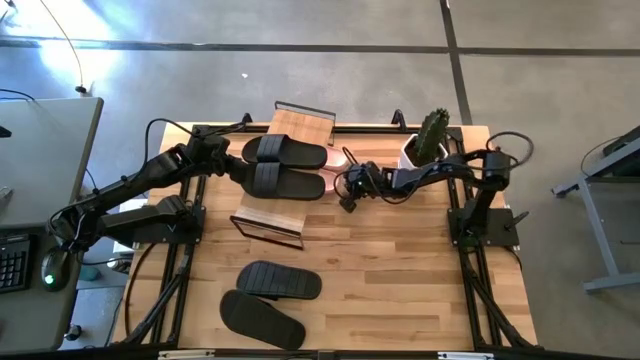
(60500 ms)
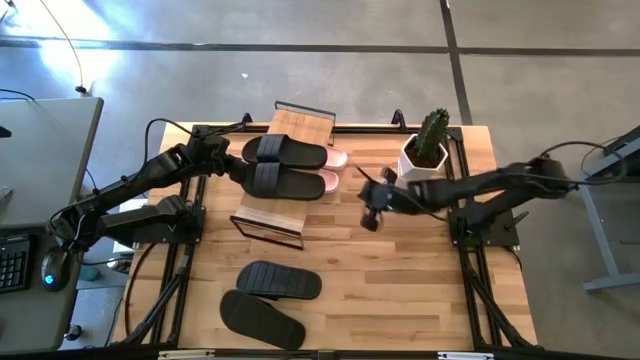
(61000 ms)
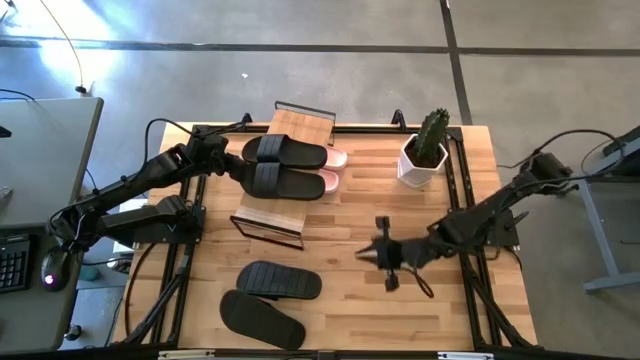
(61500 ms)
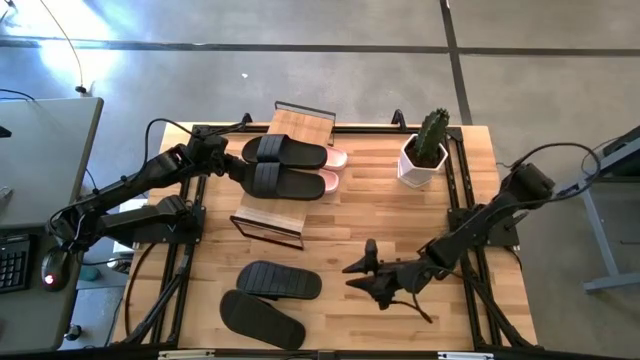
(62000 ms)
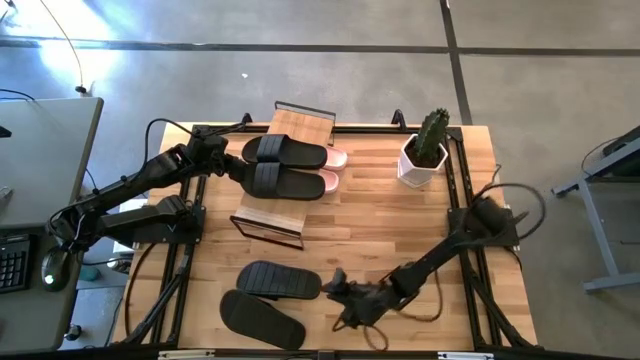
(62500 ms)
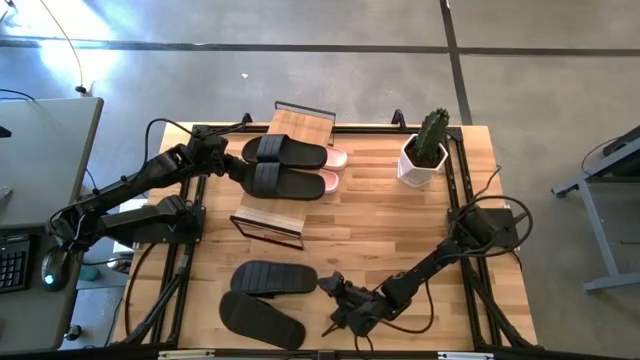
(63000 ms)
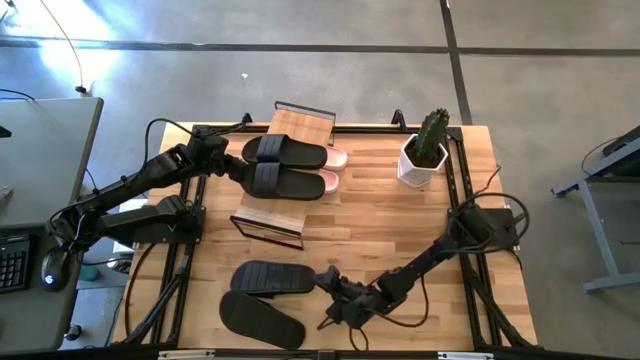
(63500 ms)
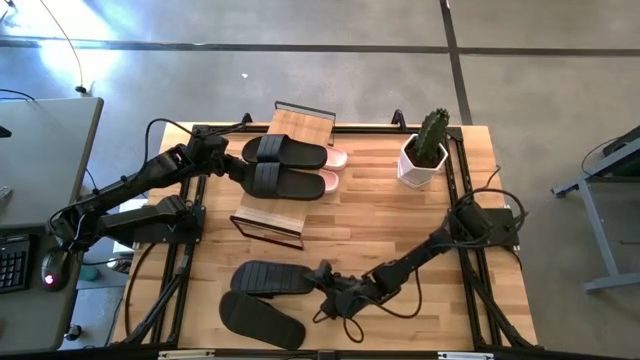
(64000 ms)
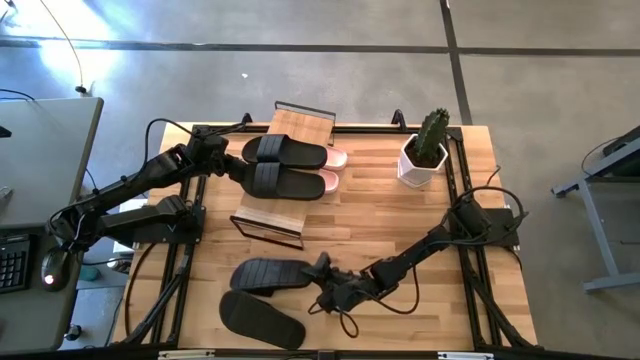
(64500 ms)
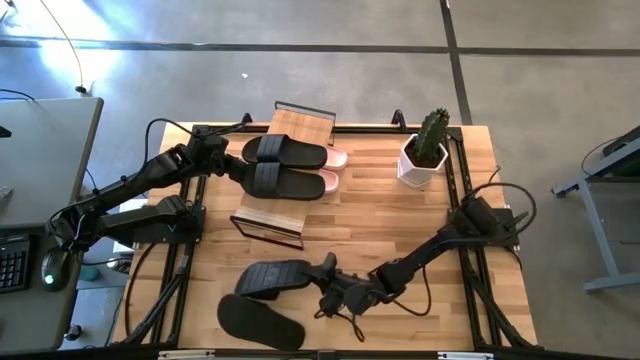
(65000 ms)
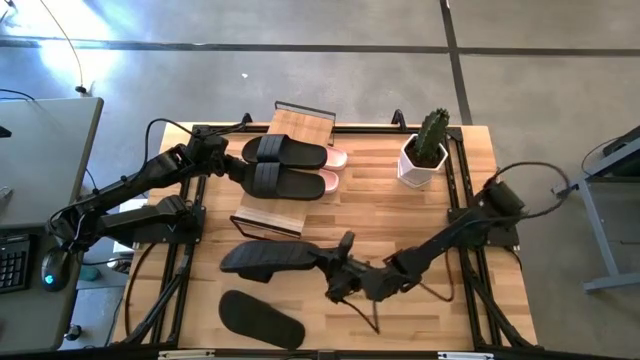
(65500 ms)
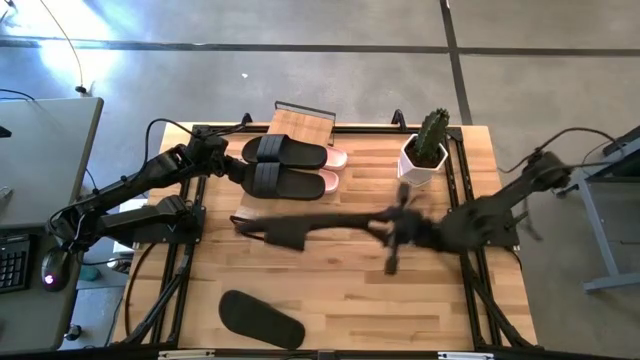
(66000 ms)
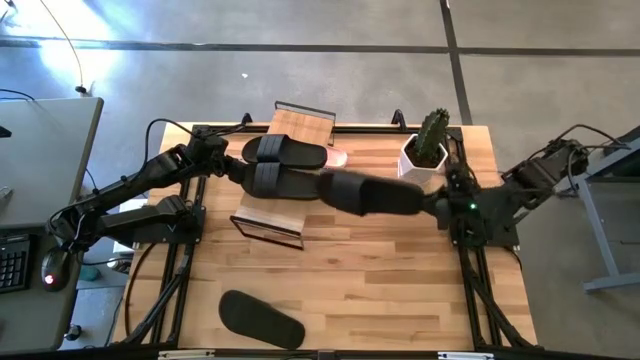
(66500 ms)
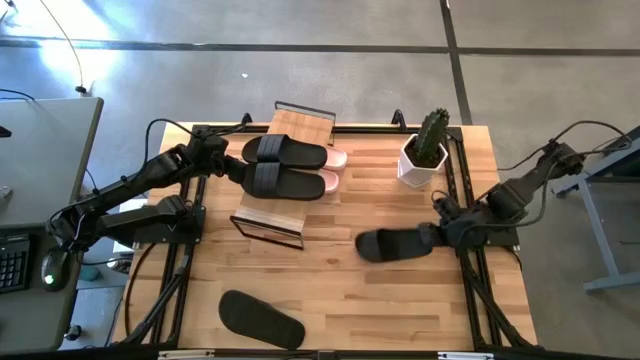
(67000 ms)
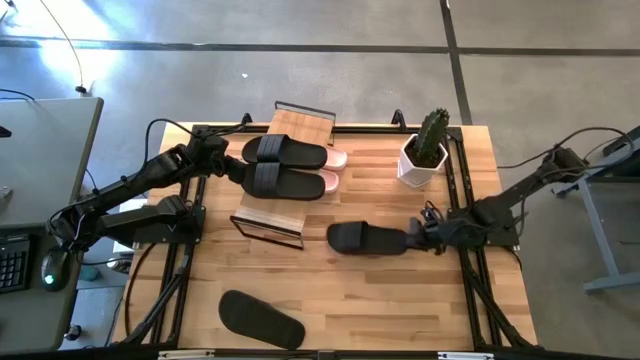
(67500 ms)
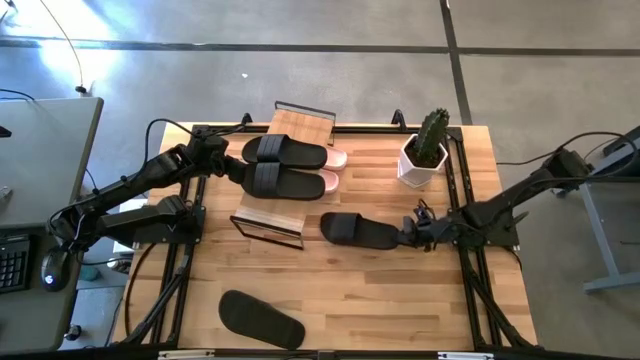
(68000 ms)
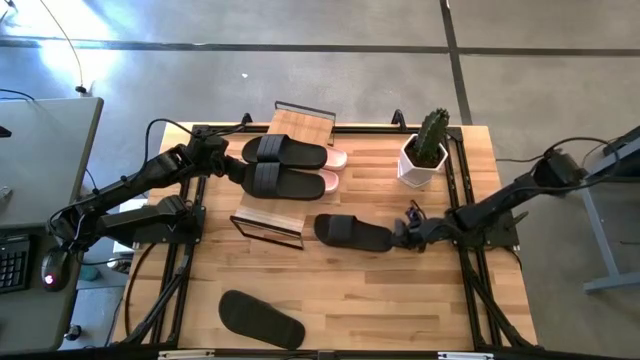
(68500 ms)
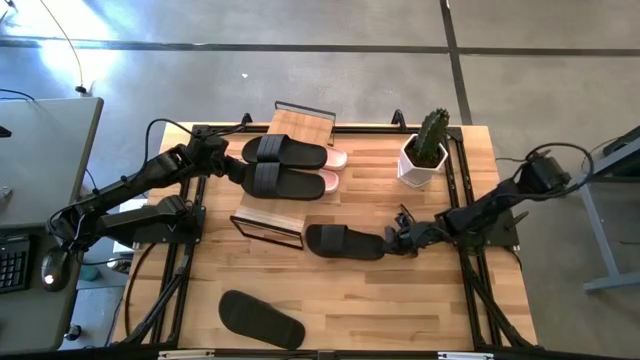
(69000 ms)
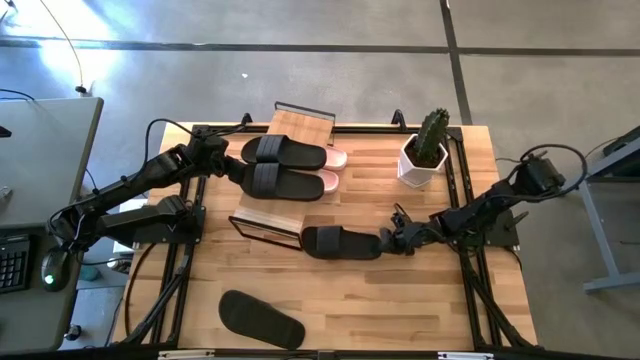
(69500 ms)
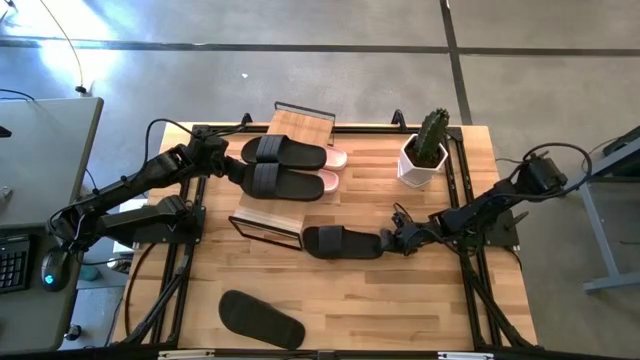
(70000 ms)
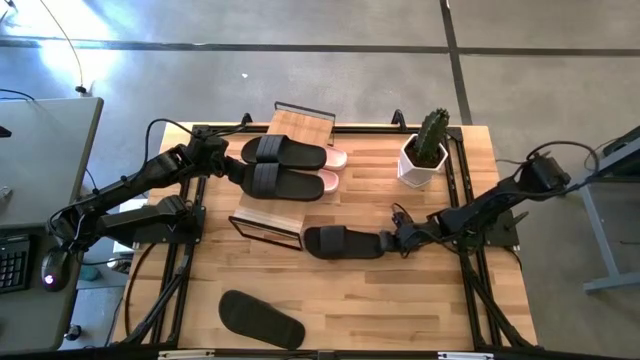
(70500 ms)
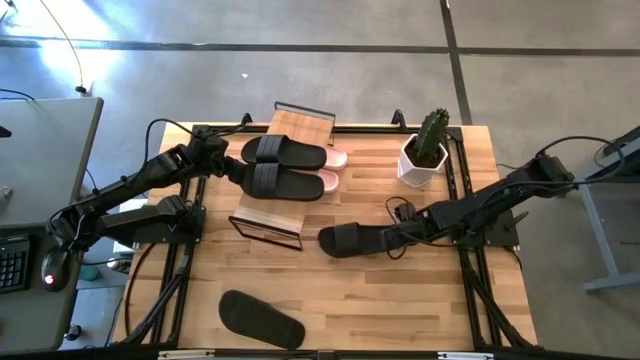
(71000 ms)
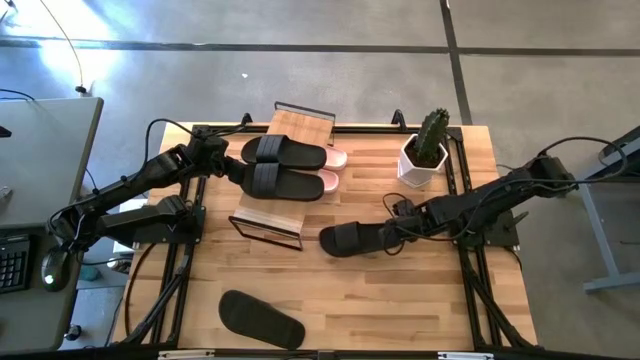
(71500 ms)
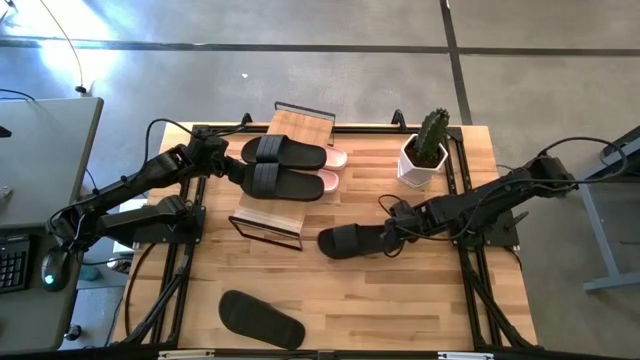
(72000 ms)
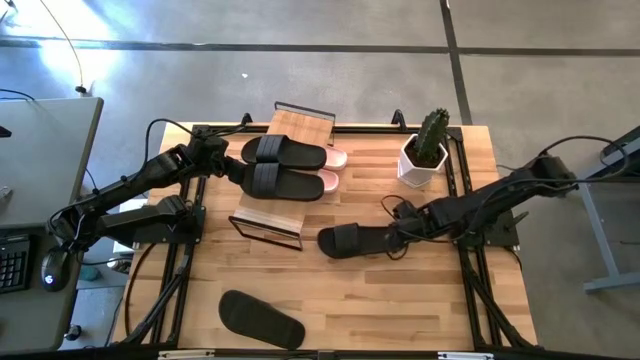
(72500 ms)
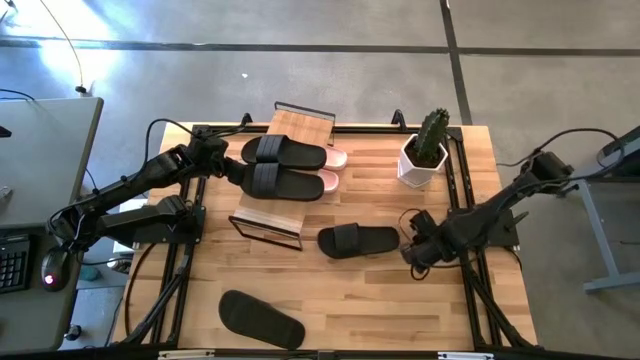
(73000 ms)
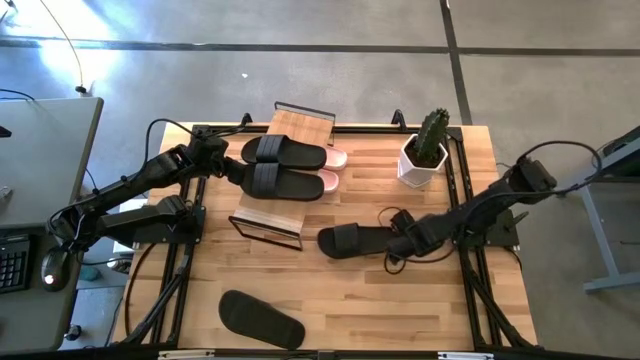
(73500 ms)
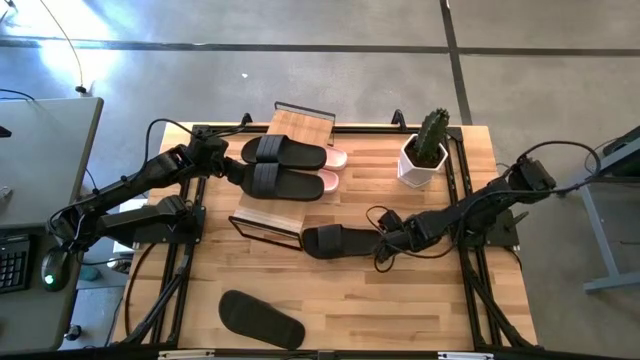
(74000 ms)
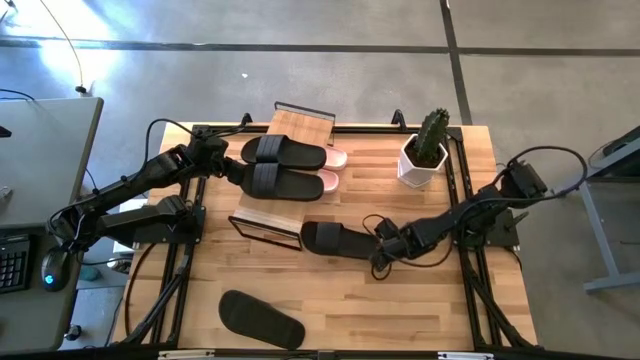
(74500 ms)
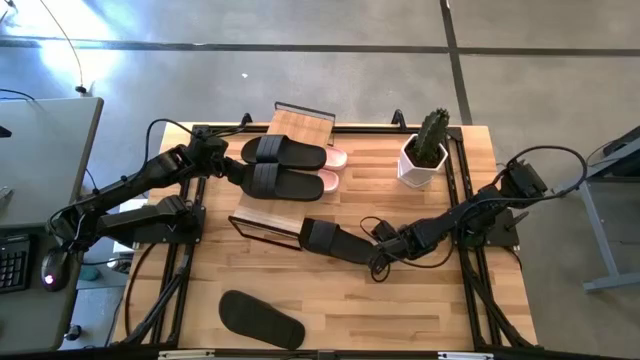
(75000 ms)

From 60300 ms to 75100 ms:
Task: Pick and place slides into the shelf
Put the black slides under the shelf

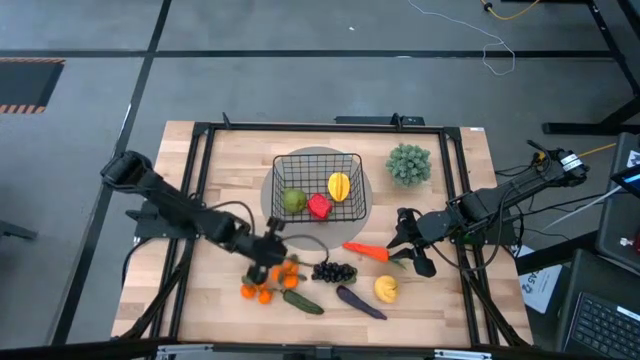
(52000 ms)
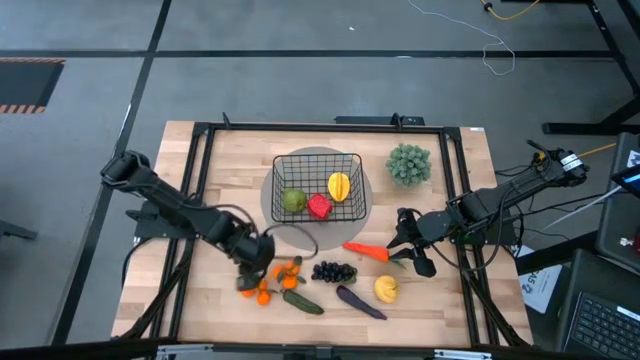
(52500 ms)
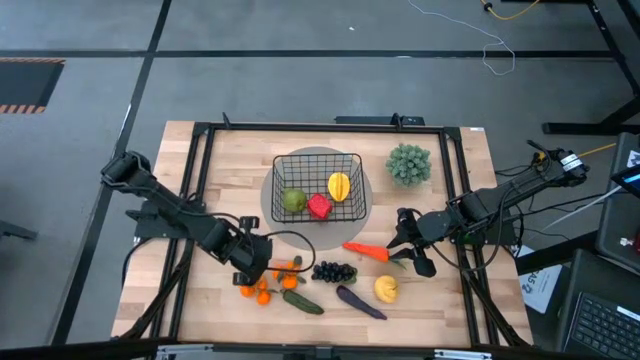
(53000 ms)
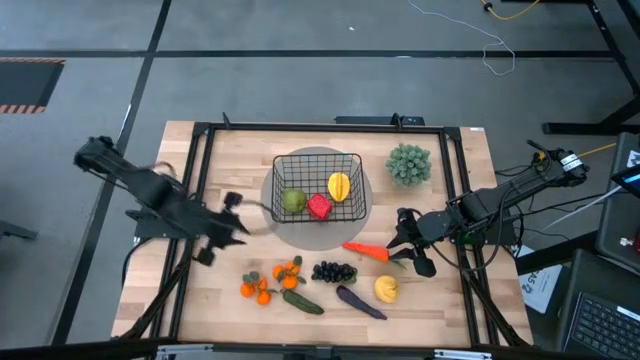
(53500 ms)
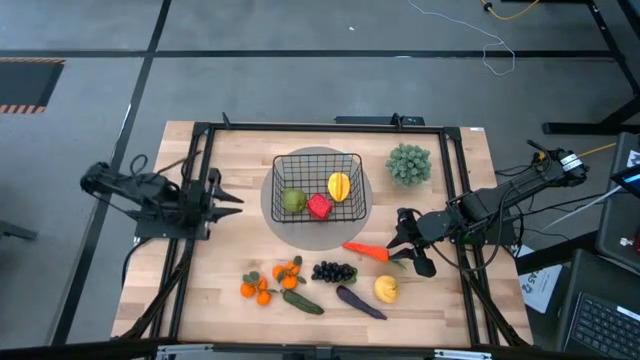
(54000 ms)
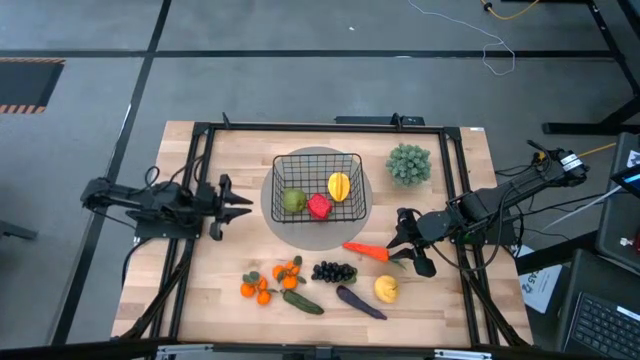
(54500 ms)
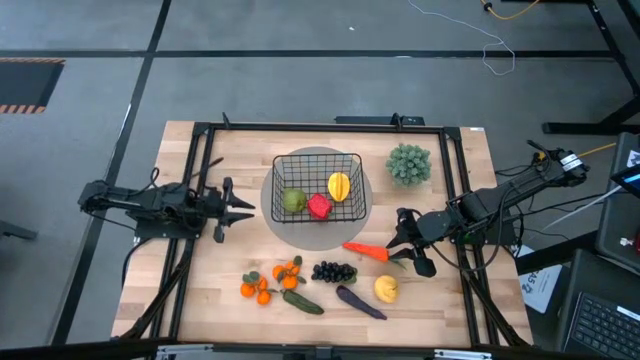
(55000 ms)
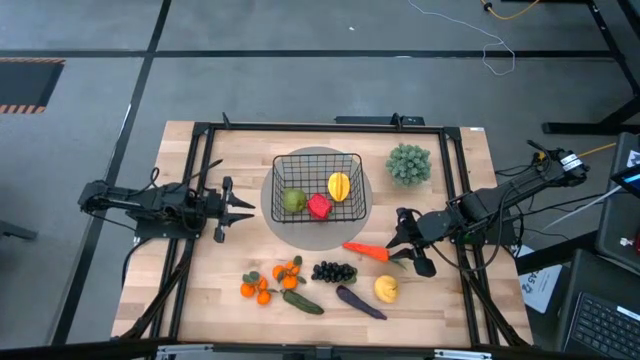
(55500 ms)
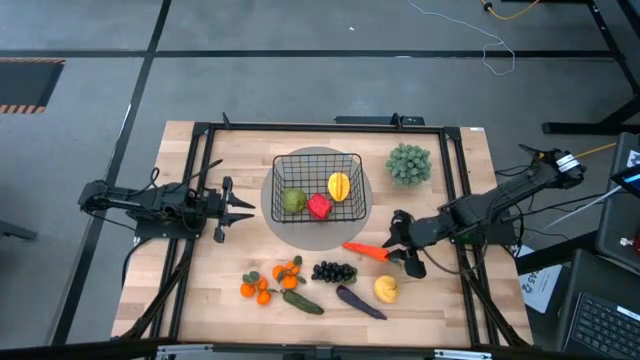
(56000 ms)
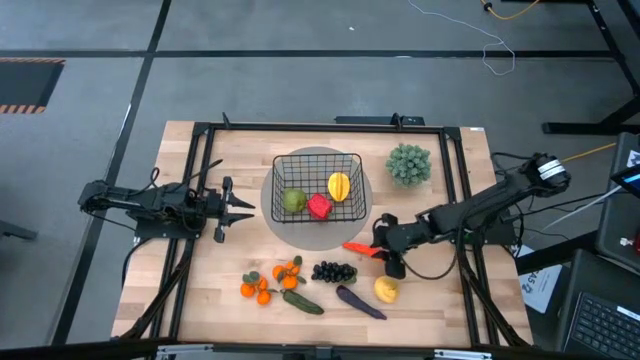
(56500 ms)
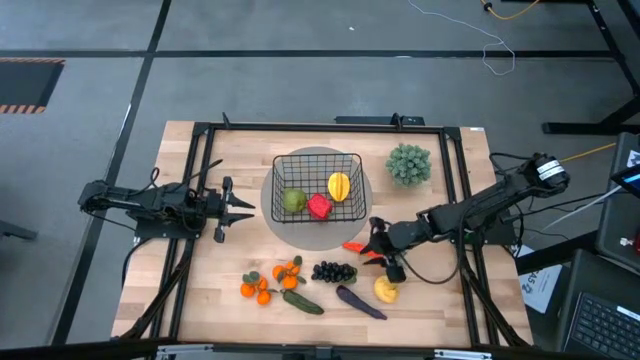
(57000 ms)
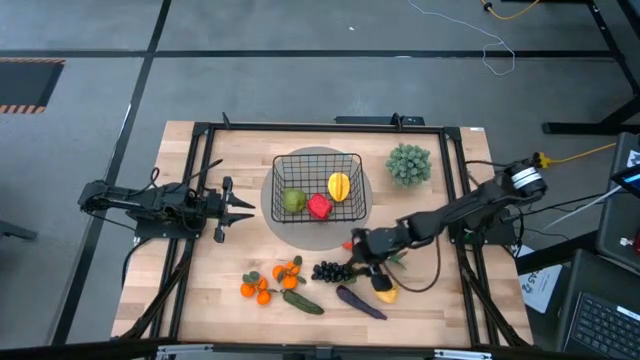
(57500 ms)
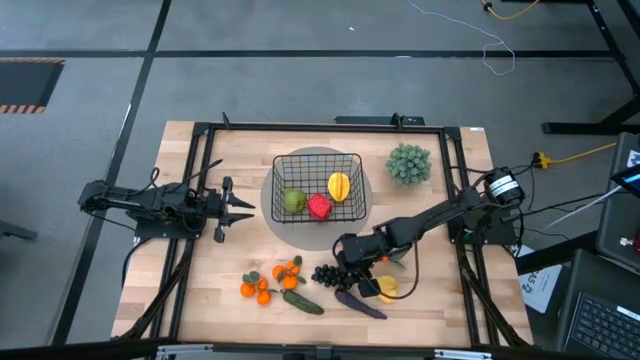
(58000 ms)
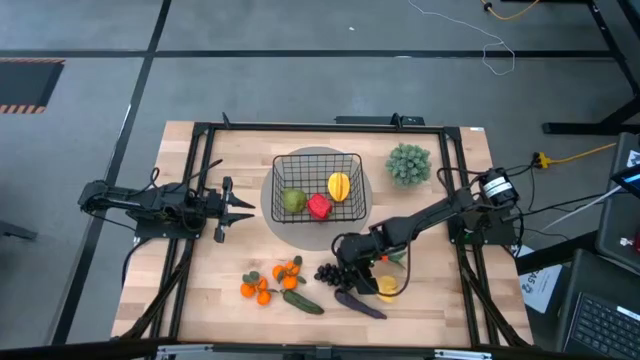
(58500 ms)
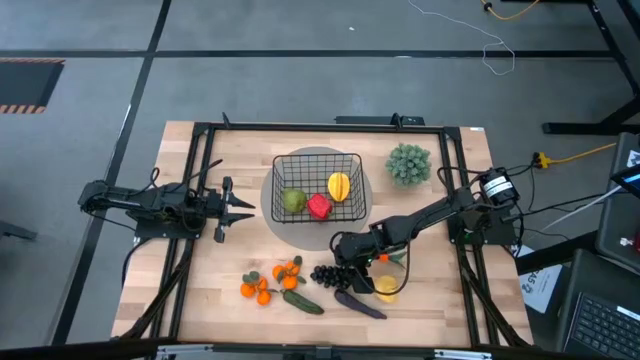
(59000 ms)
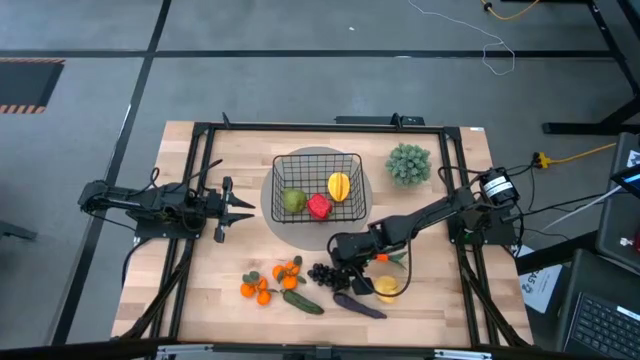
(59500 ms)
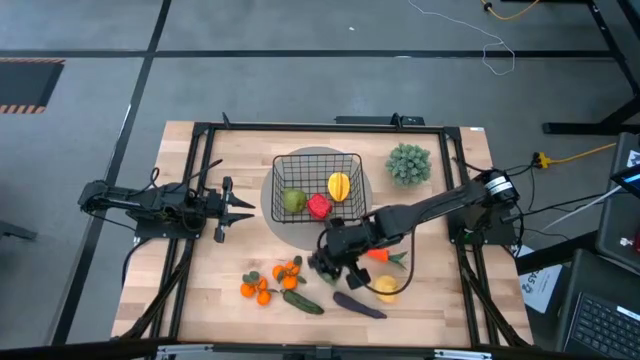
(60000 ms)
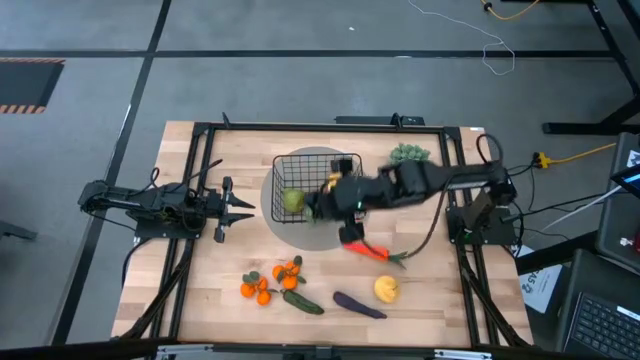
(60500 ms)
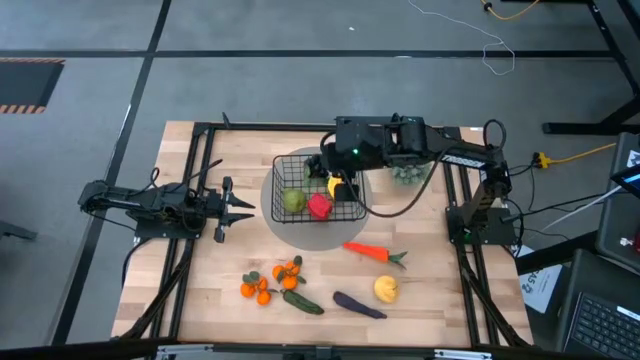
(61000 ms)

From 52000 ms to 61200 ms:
Task: Build produce basket
Put the violet grapes into the black wire basket
